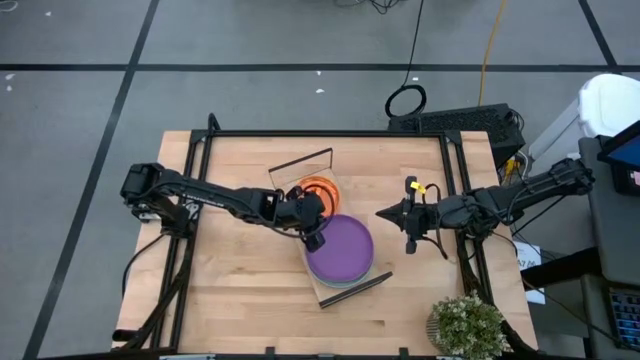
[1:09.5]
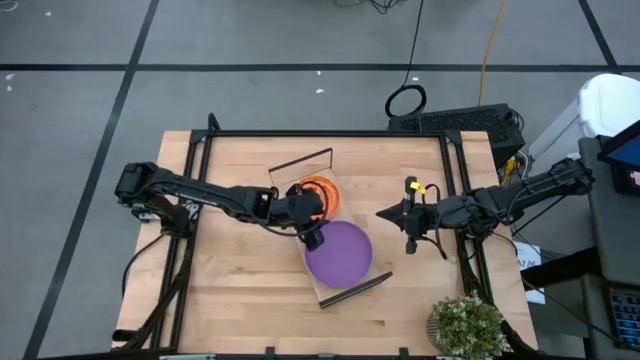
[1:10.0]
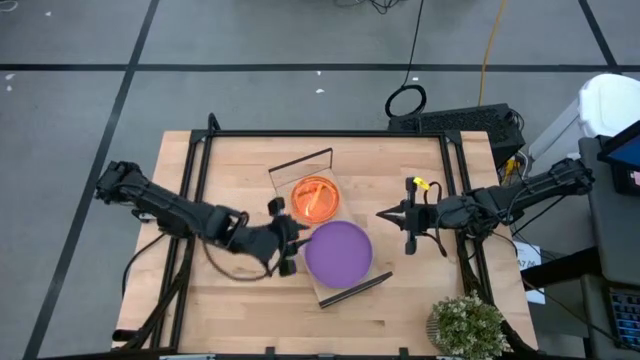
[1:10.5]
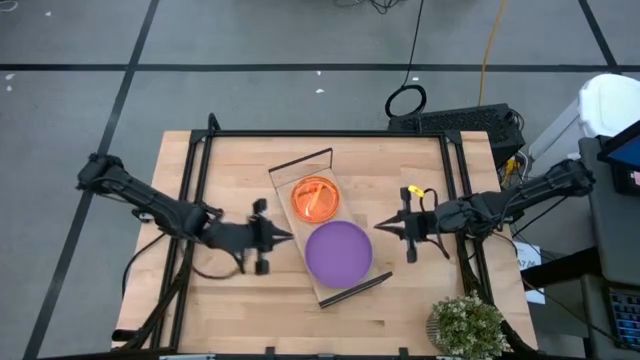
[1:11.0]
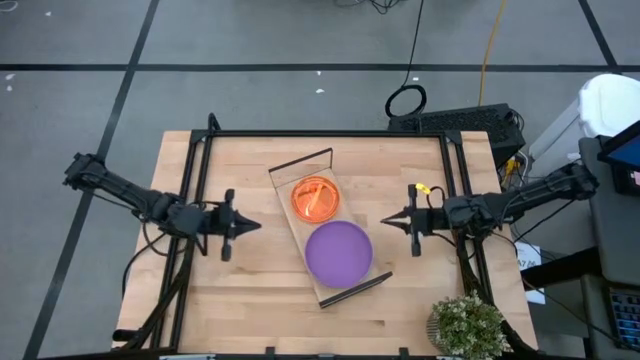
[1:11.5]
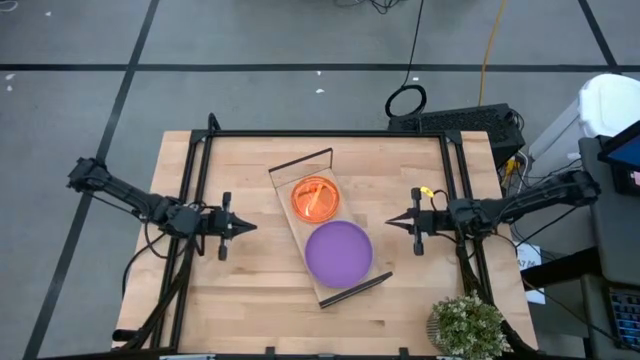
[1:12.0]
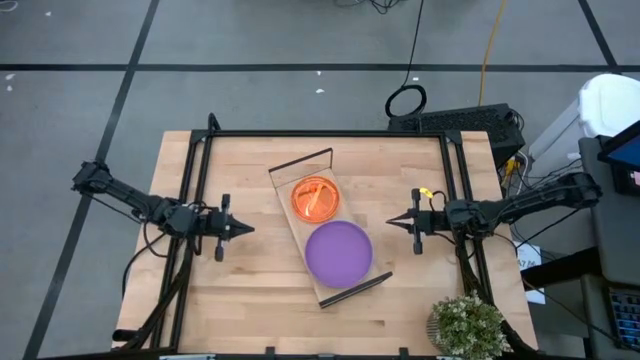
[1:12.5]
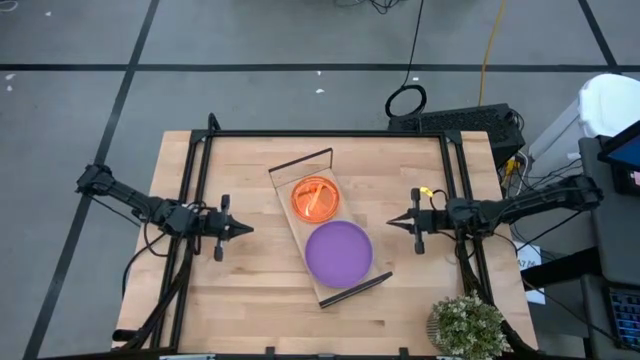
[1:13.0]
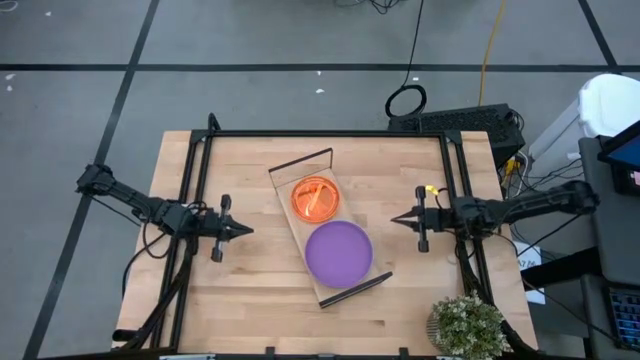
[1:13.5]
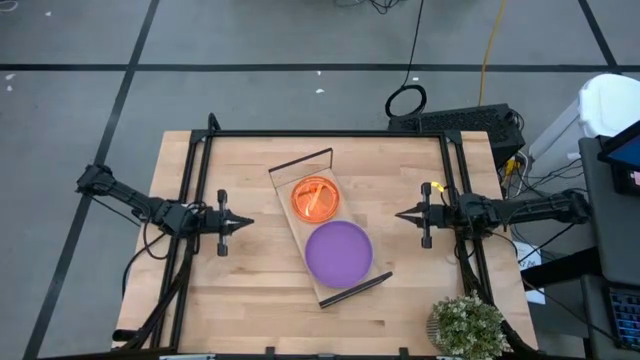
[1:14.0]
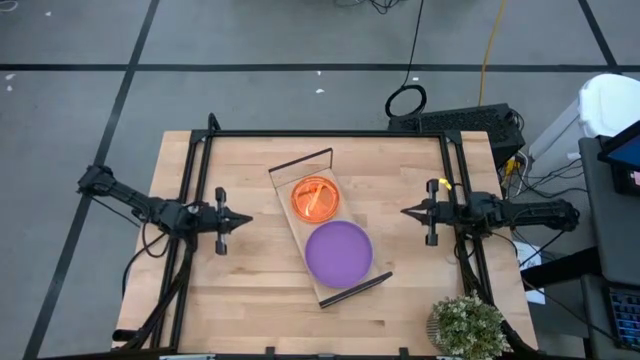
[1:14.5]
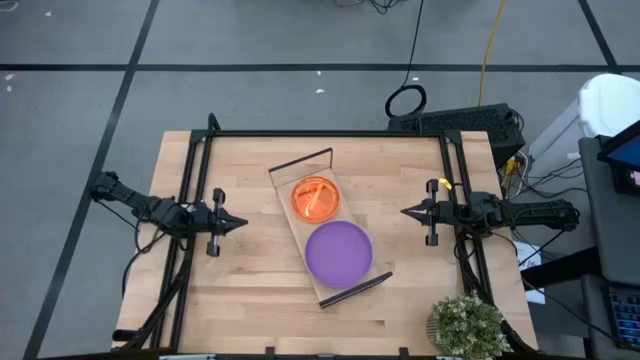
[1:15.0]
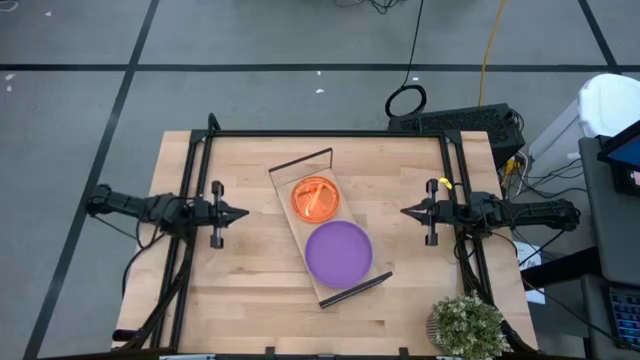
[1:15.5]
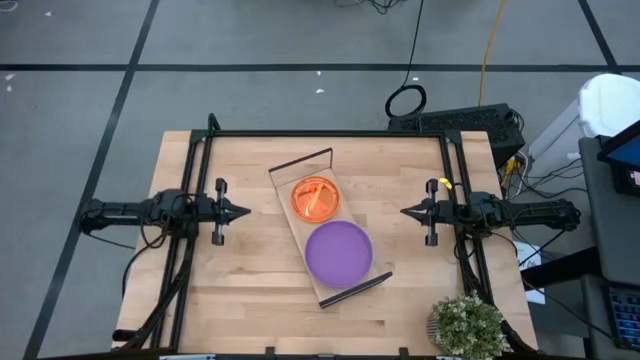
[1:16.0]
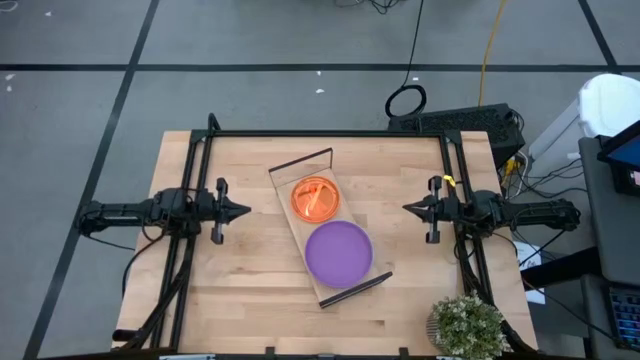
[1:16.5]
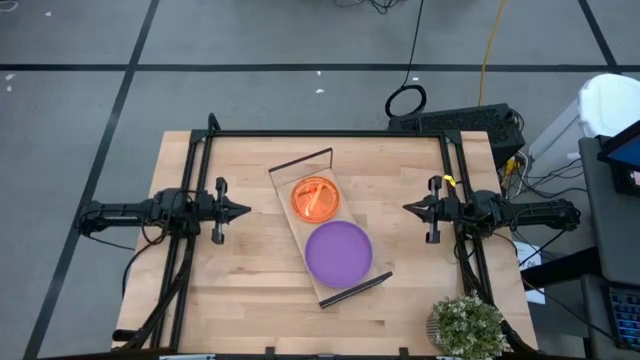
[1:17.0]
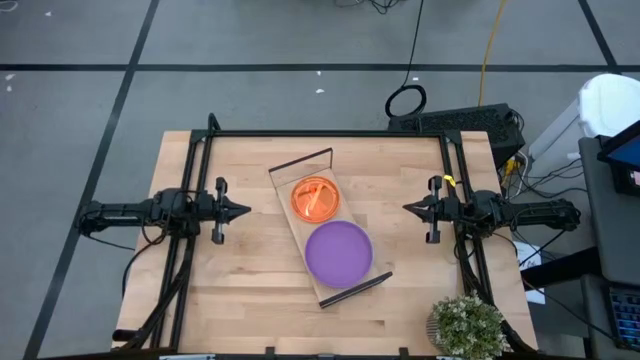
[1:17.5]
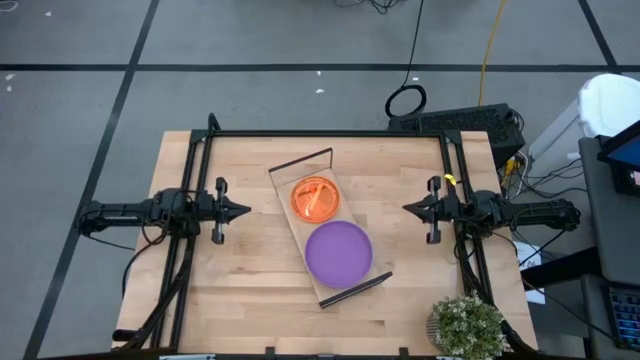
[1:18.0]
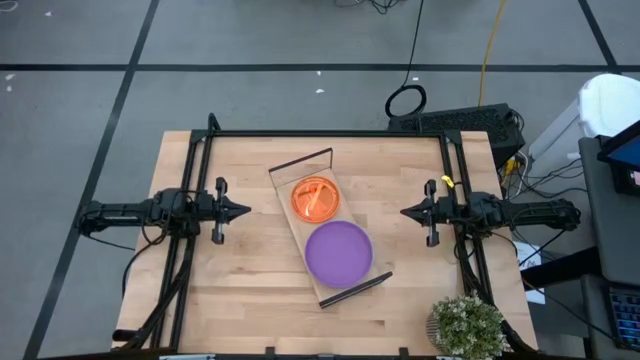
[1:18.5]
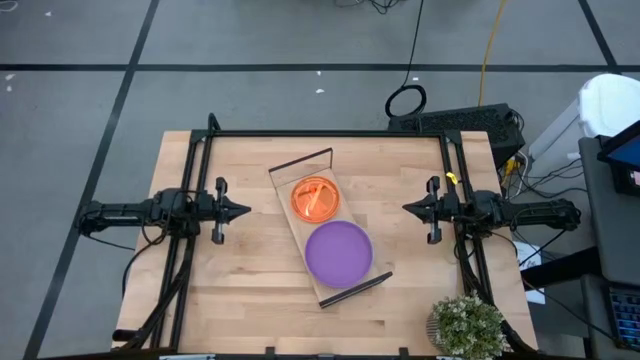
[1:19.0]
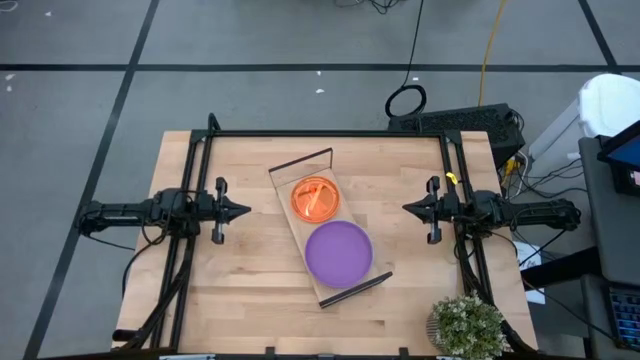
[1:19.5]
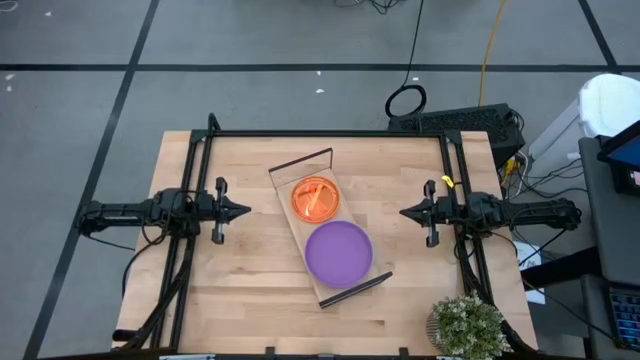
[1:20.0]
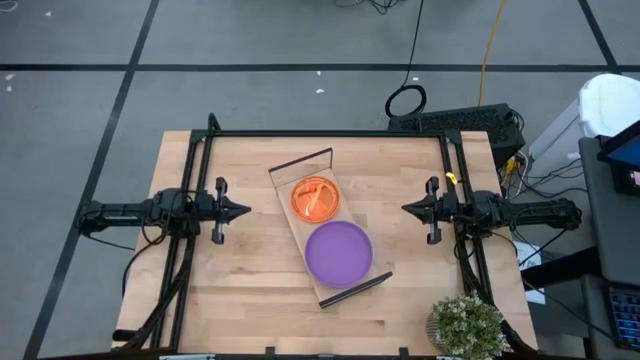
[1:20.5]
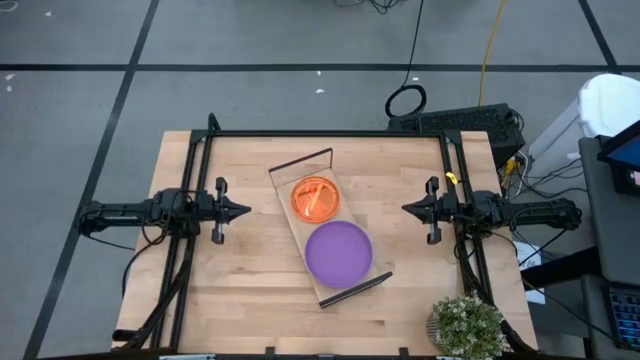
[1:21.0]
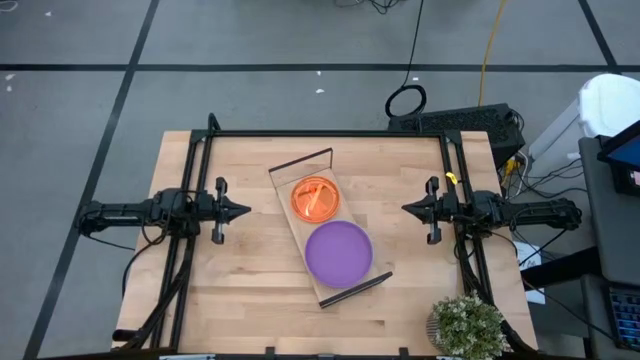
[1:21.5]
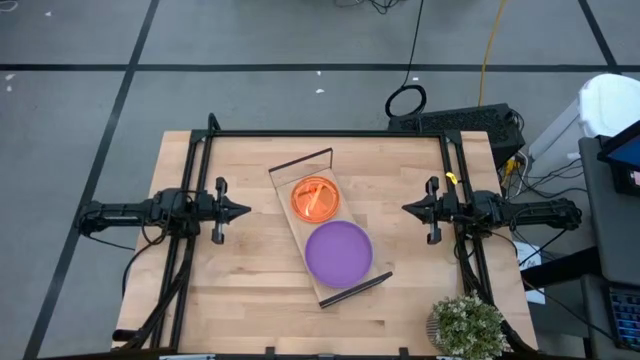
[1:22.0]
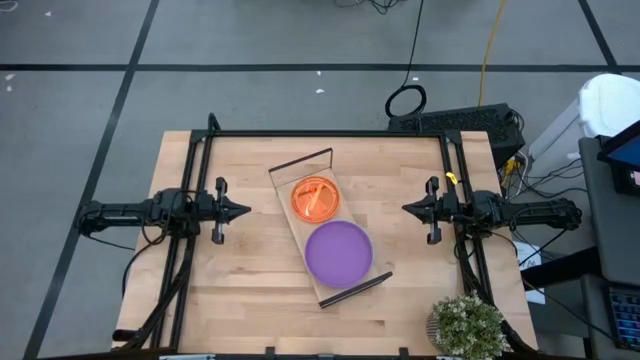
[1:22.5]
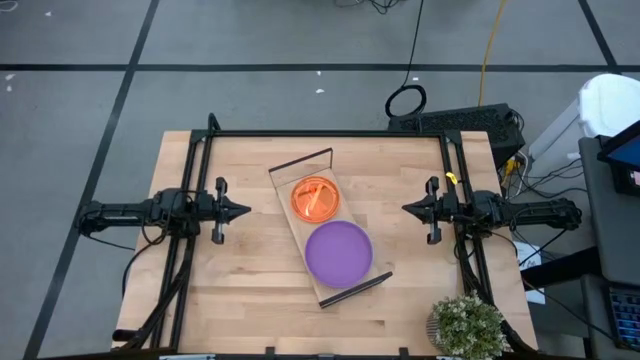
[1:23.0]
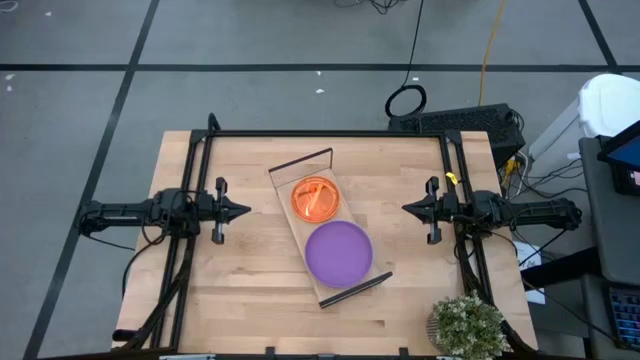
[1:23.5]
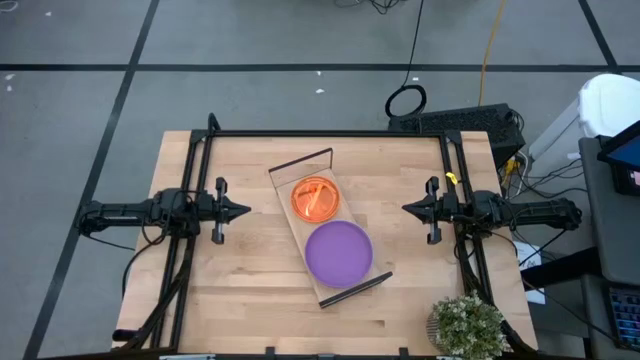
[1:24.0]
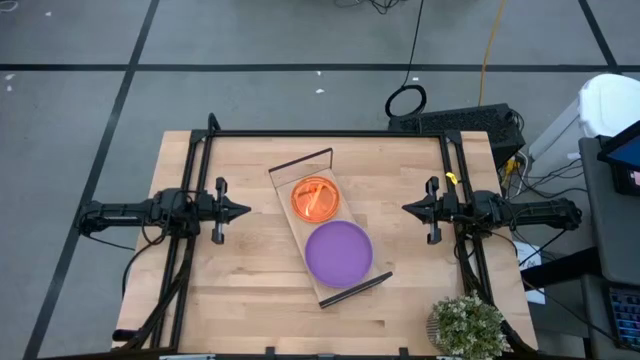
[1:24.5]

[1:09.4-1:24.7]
Task: Place and stack plates onto a shelf
Return to Home Position

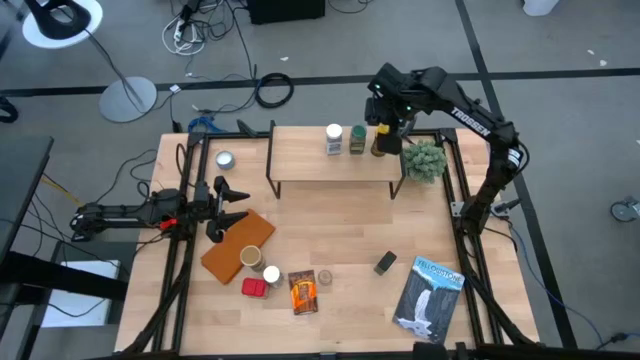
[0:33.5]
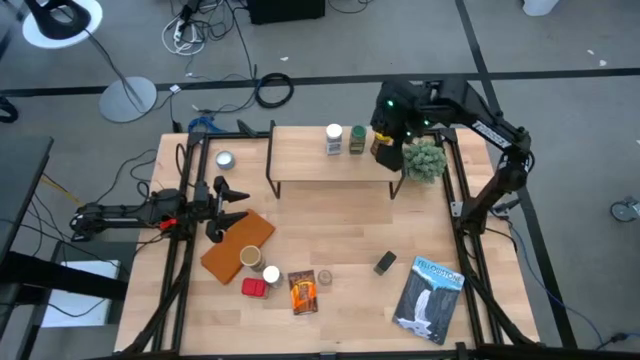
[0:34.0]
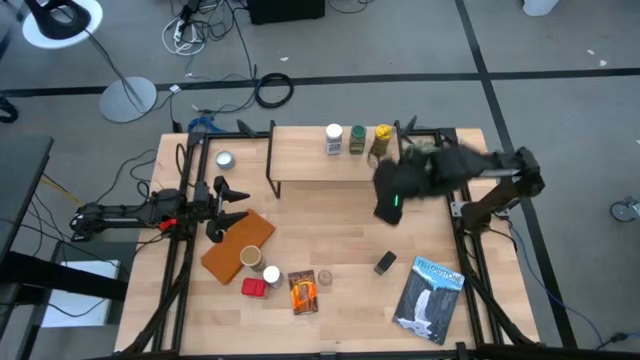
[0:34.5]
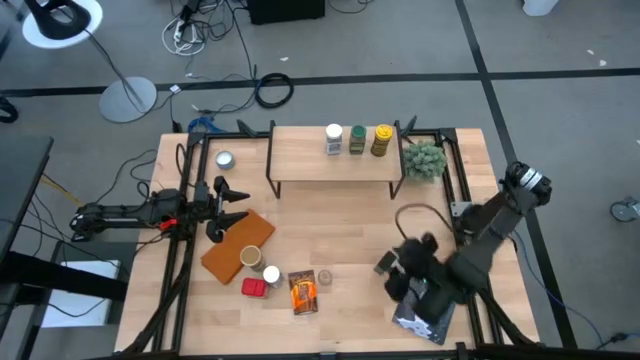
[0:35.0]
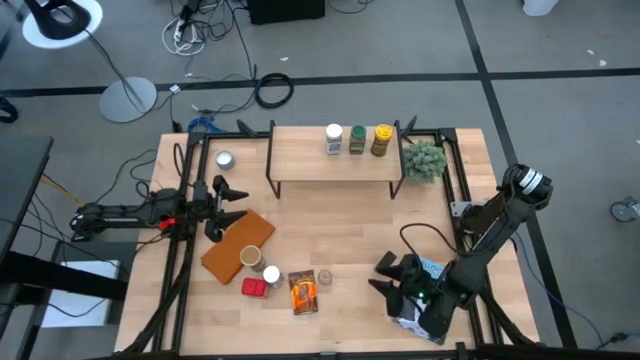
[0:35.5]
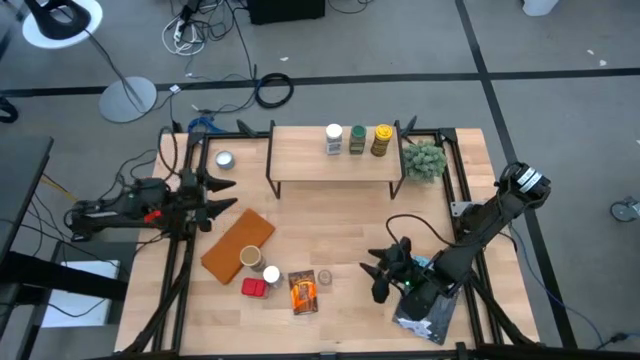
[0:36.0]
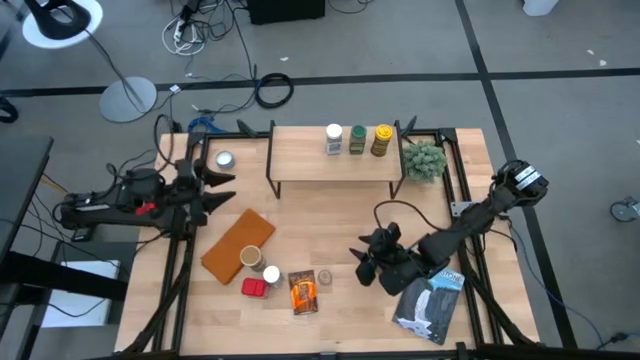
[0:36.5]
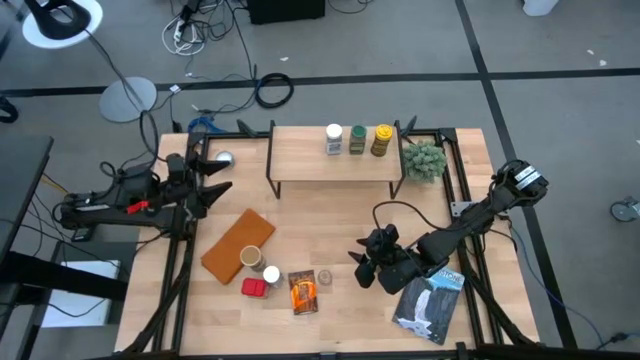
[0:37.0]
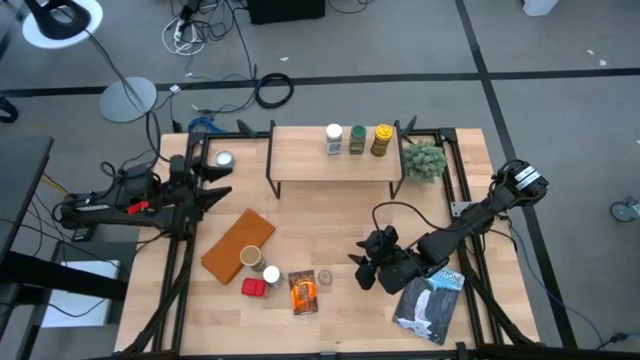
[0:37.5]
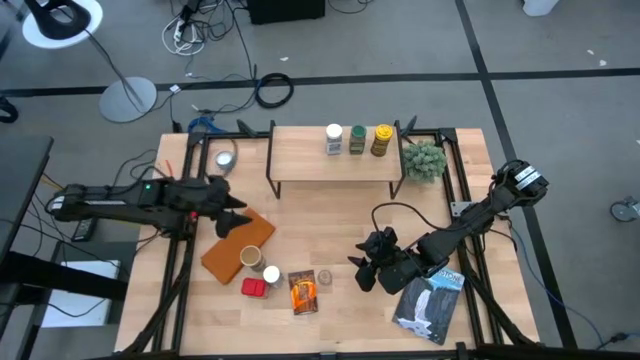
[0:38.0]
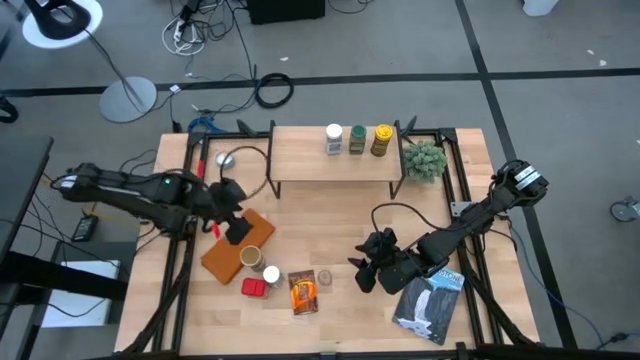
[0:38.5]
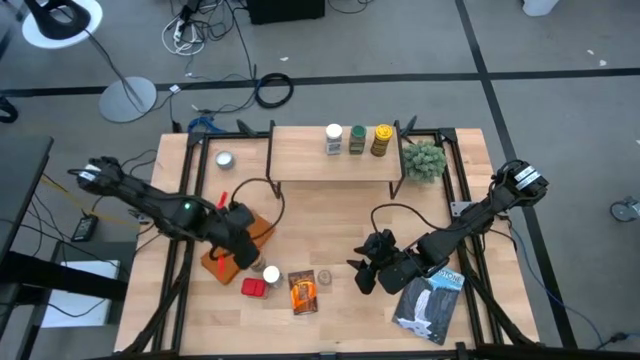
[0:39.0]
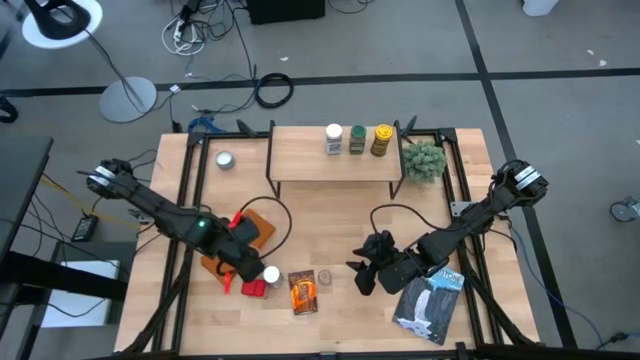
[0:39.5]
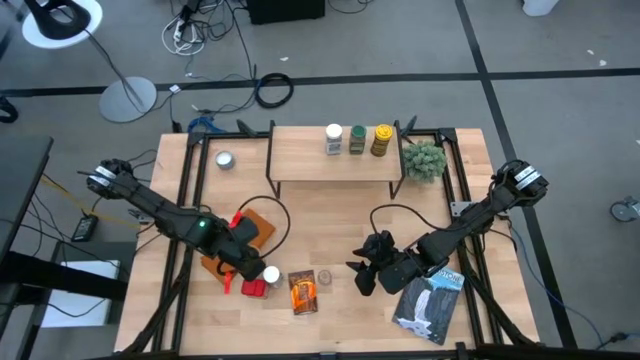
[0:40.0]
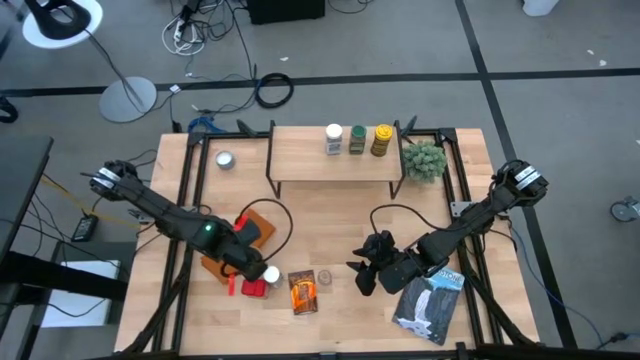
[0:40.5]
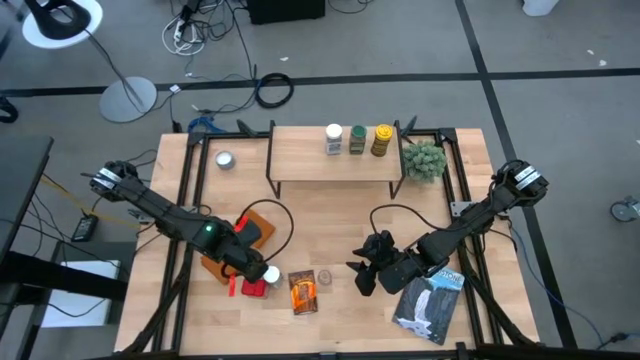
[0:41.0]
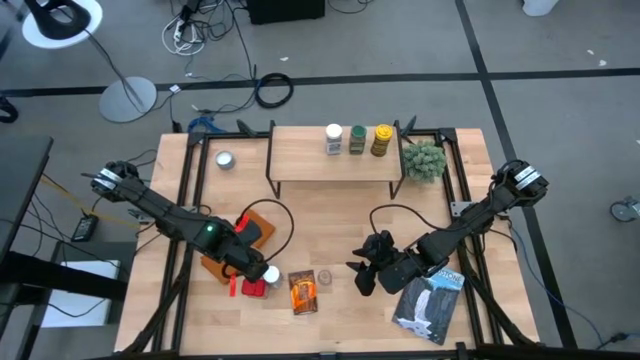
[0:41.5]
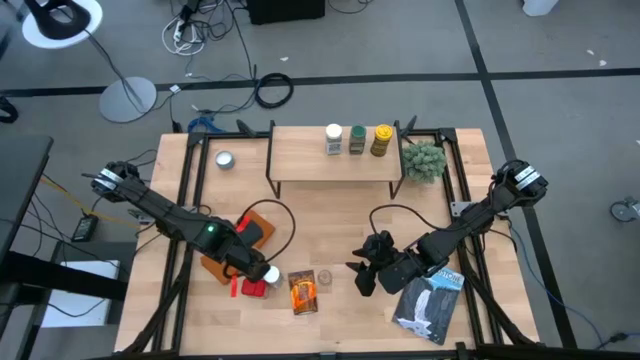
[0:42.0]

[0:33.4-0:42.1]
Task: Shelf spices
Put the brown seasoning bottle on the shelf
